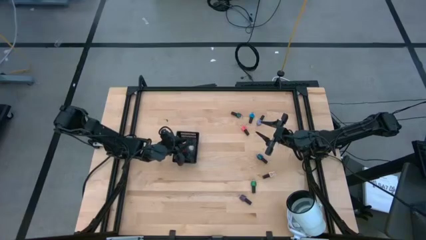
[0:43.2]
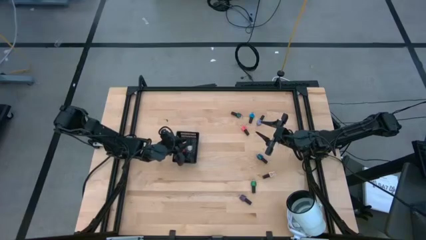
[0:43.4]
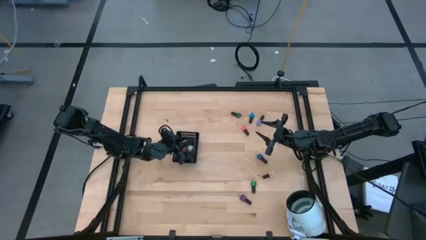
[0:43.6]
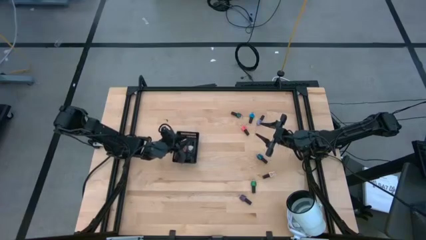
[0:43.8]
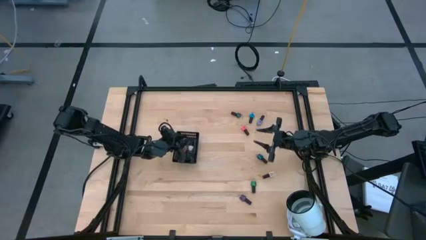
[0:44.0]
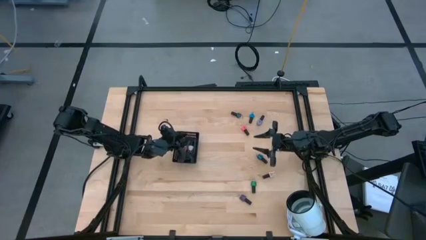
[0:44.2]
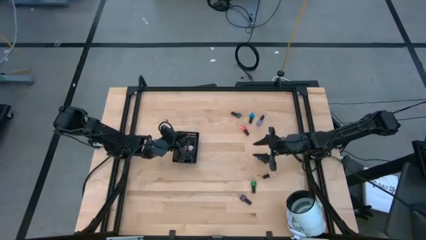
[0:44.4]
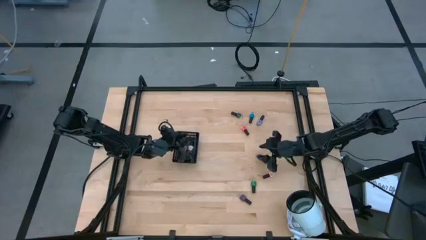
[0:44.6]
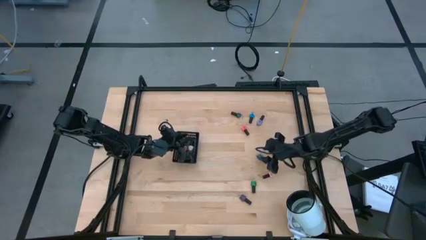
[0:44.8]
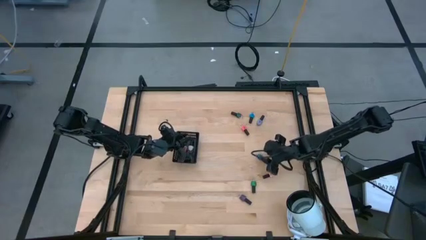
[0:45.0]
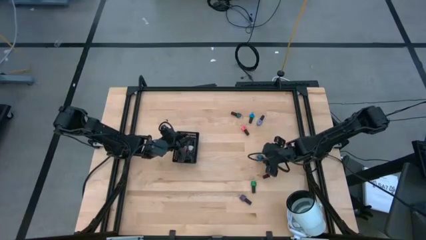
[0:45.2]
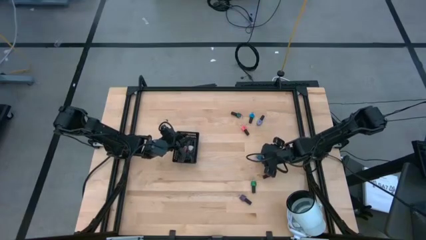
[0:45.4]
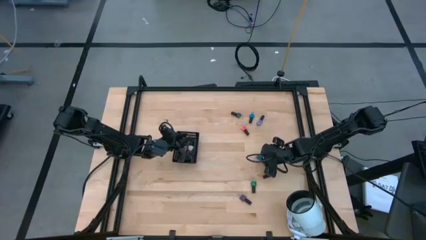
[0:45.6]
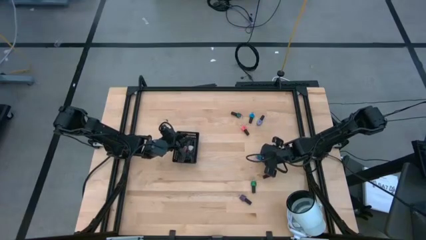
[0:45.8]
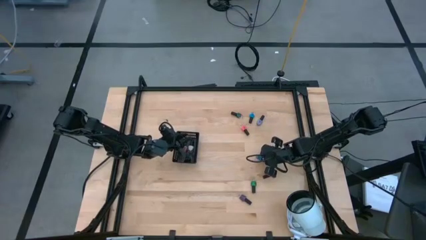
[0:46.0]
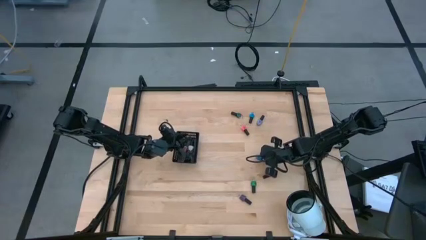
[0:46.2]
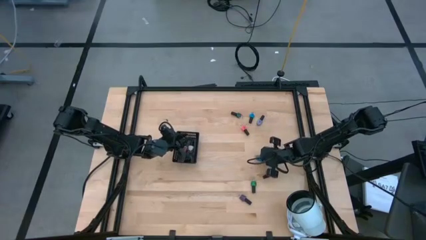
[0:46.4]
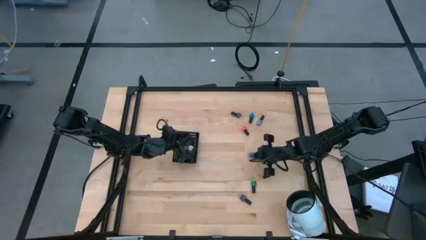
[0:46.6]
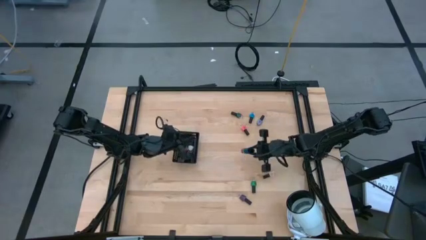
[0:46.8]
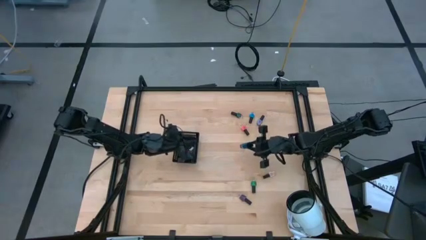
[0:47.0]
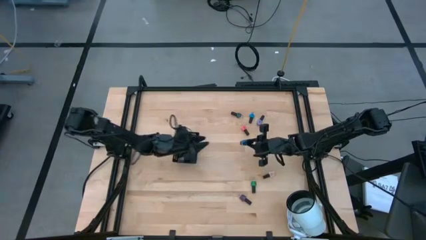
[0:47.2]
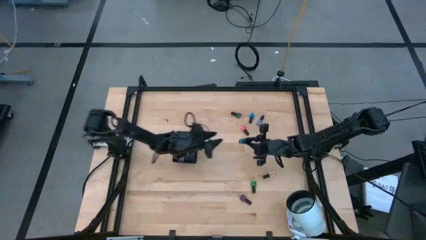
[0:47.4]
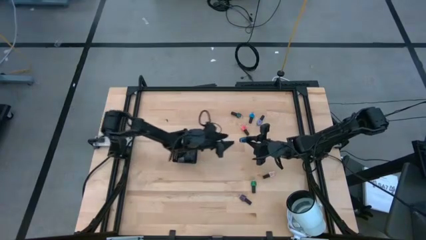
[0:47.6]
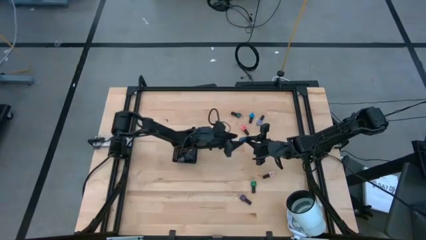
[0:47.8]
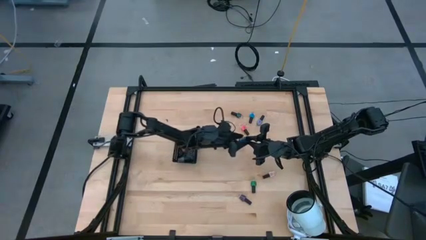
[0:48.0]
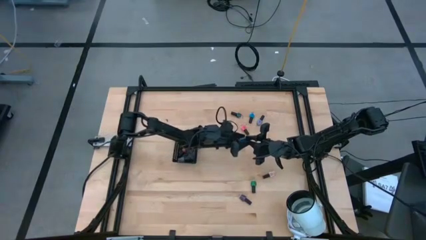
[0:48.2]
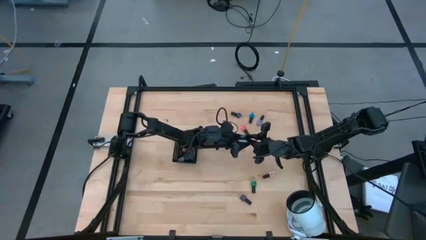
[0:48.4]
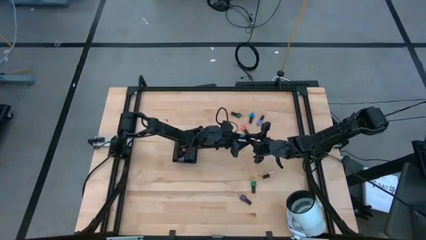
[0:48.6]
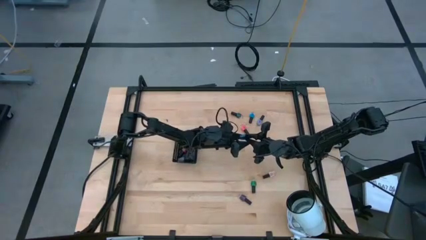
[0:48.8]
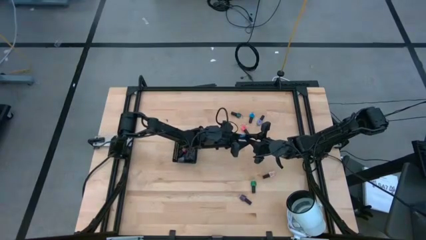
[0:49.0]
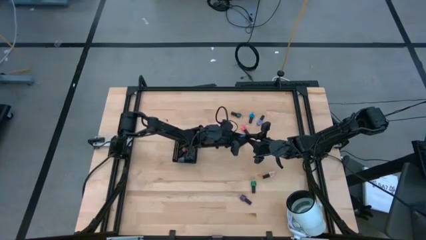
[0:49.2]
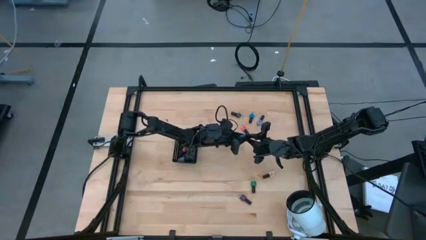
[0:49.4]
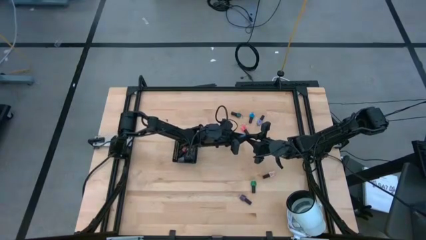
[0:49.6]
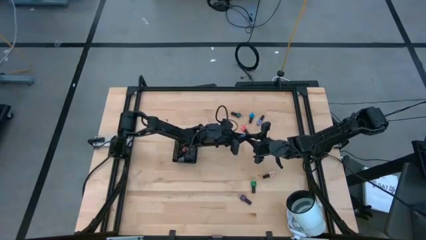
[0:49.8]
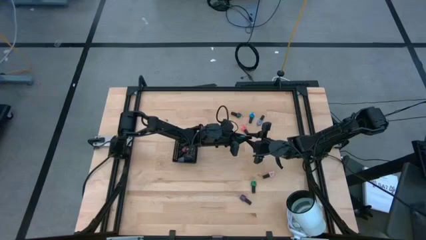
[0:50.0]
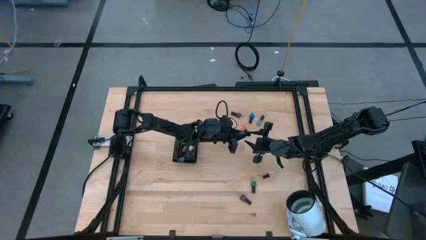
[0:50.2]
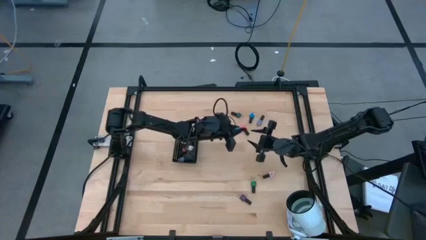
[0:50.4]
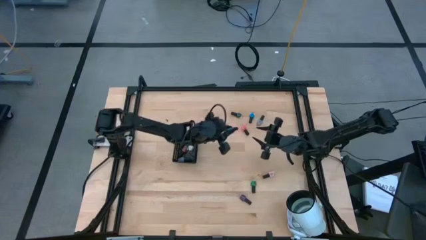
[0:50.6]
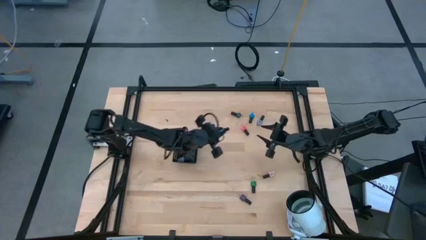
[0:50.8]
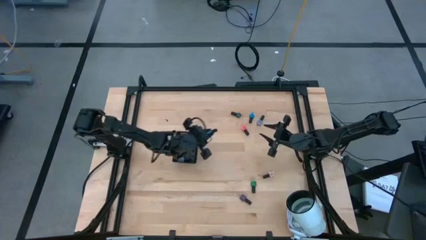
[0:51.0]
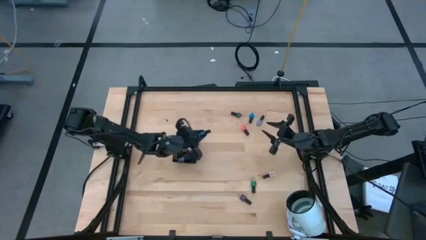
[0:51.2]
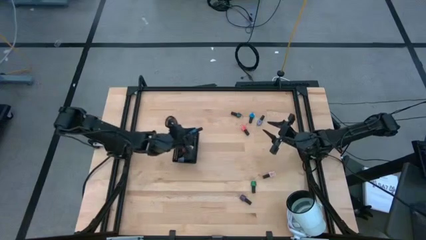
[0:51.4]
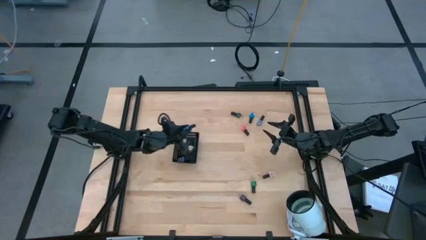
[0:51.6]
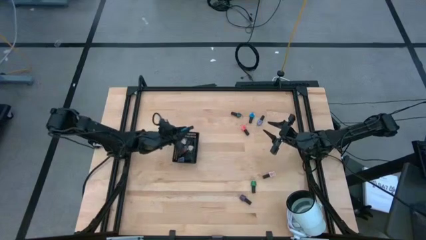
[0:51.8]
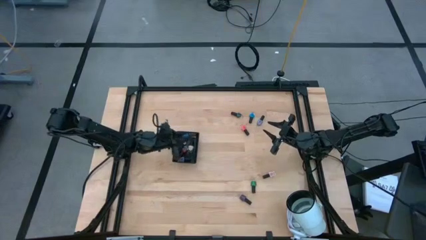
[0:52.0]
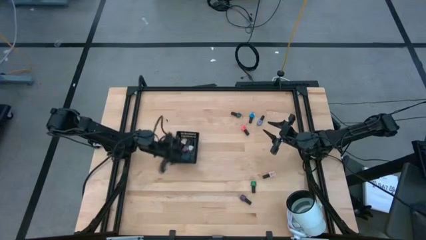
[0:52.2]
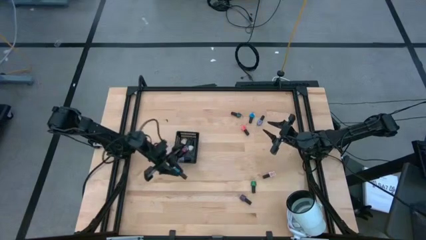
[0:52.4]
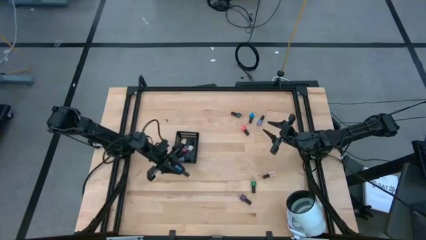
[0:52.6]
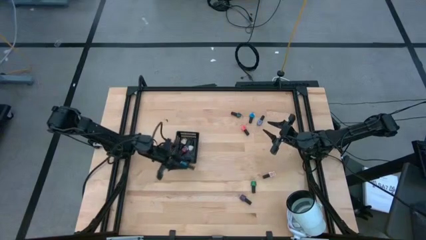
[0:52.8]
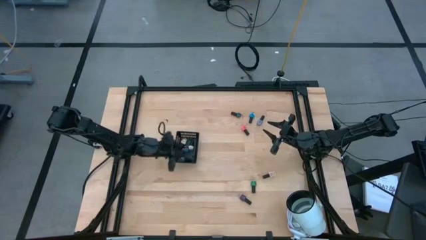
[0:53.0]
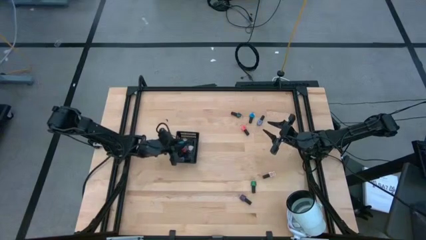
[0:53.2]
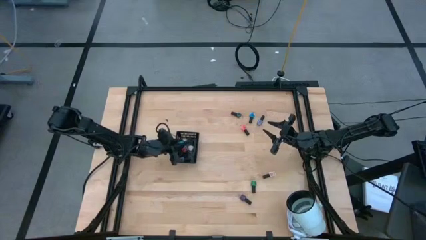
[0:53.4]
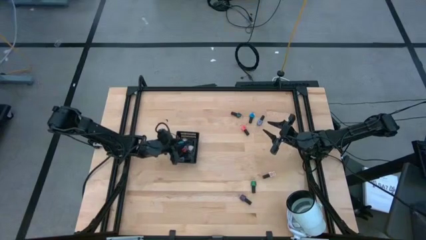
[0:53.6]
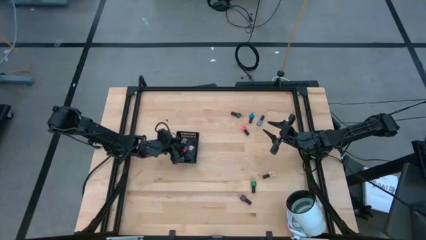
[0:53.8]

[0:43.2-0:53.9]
Task: Pick & Place Nail Polish
Put the dark blue nail polish into the basket
